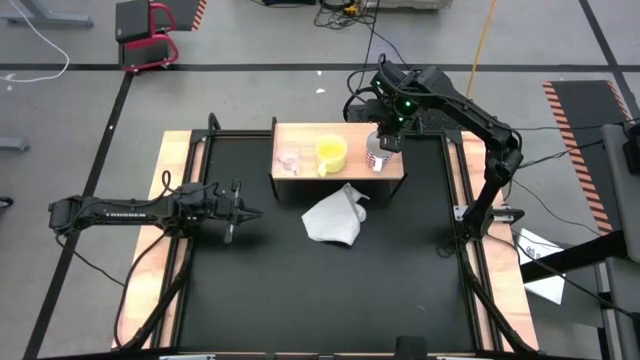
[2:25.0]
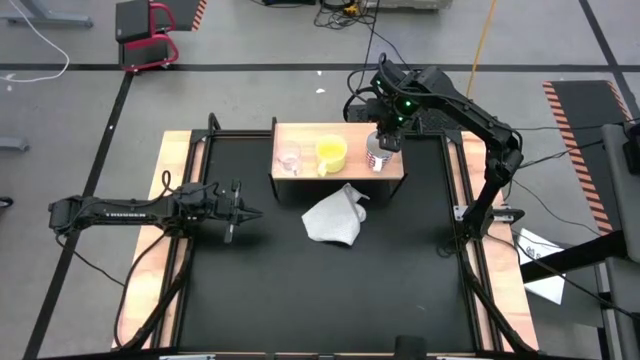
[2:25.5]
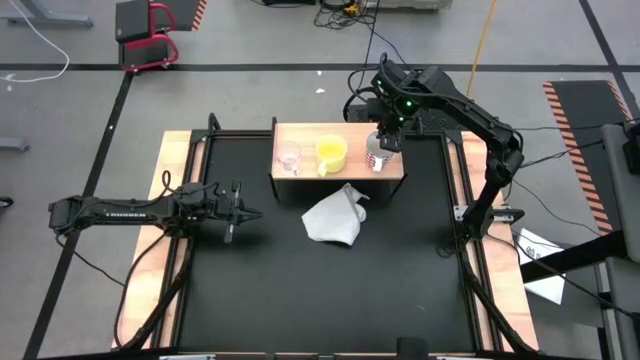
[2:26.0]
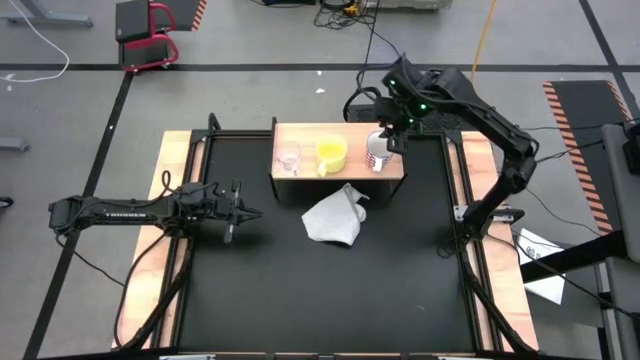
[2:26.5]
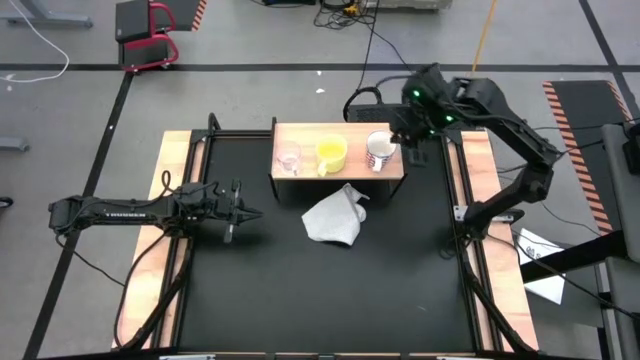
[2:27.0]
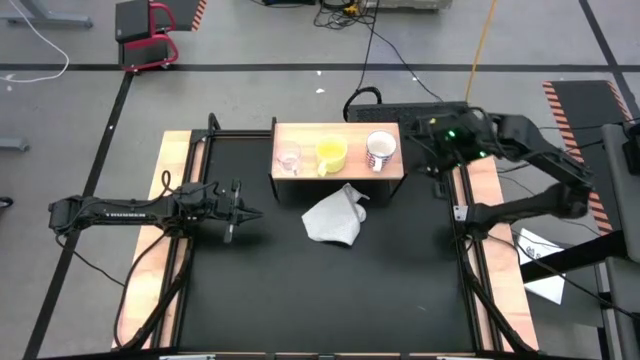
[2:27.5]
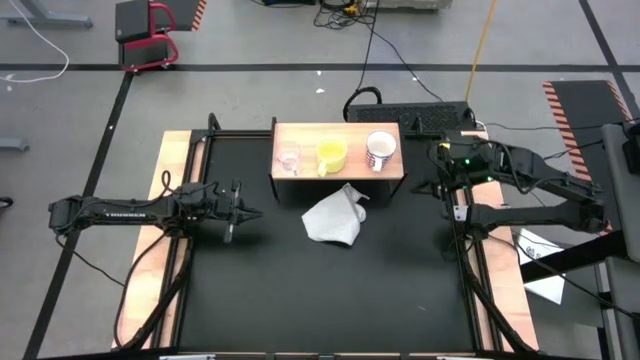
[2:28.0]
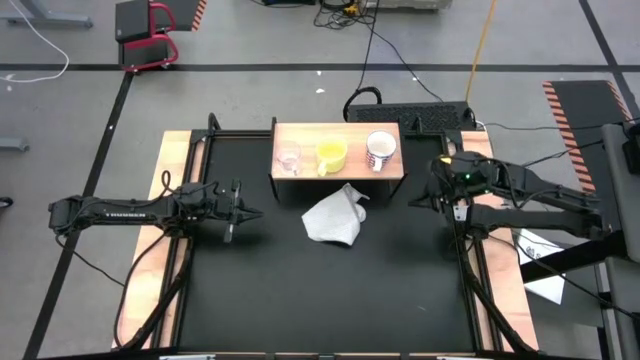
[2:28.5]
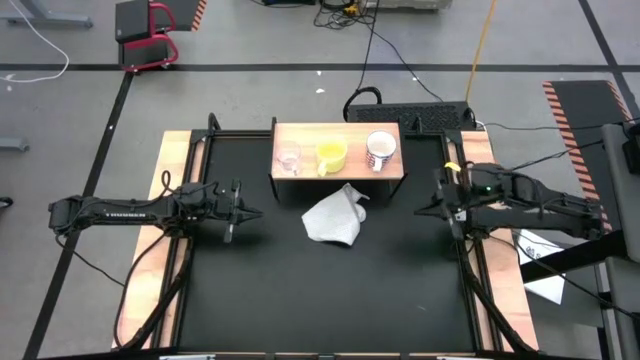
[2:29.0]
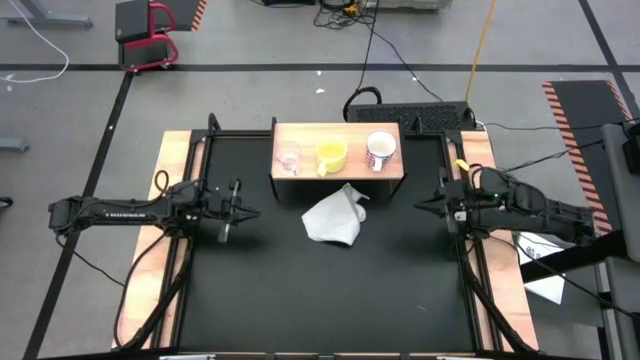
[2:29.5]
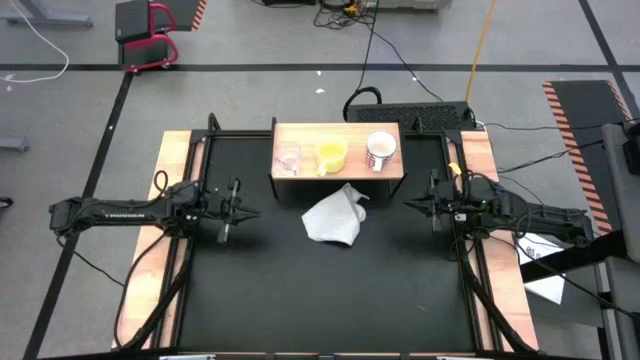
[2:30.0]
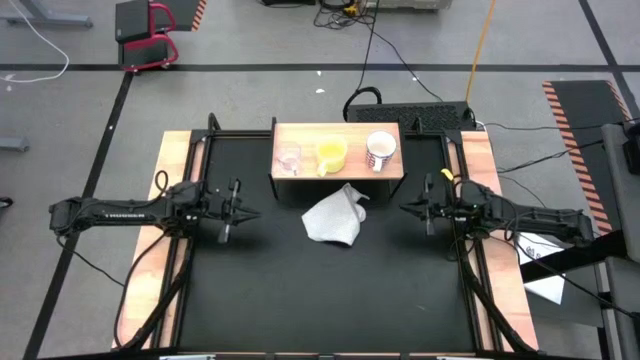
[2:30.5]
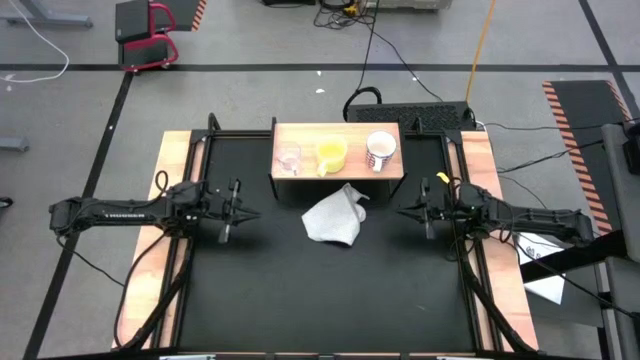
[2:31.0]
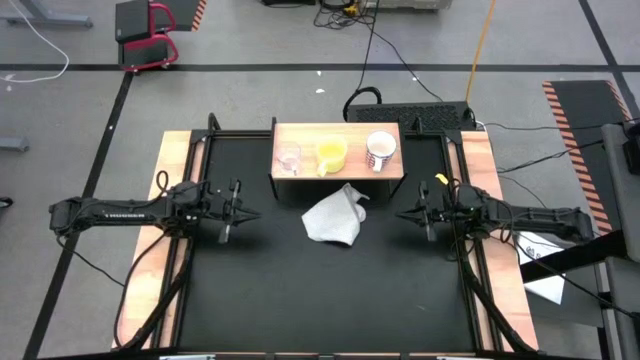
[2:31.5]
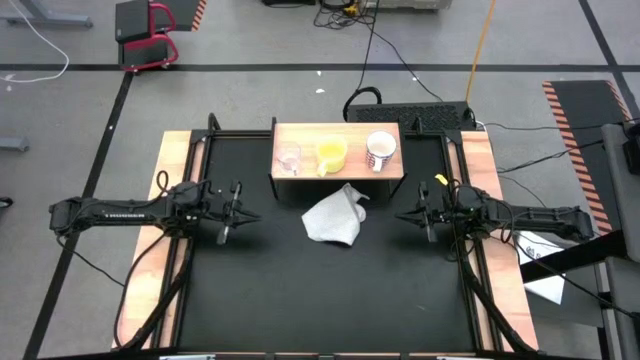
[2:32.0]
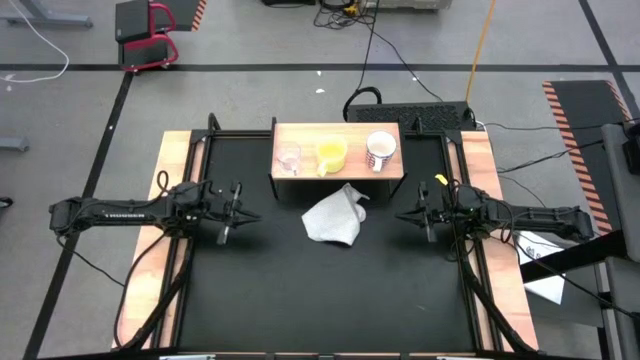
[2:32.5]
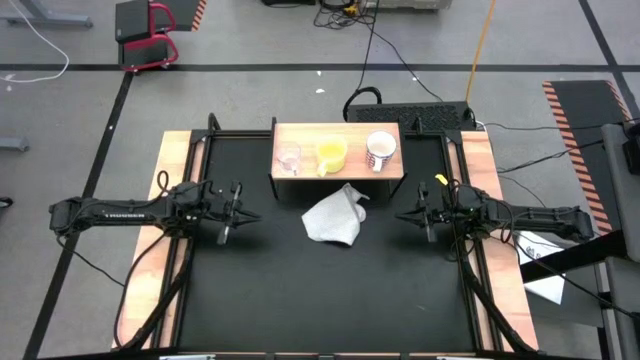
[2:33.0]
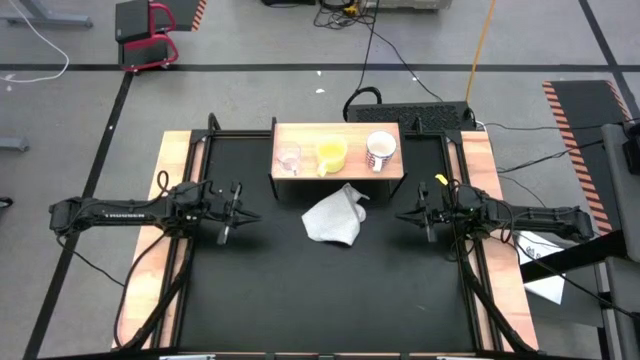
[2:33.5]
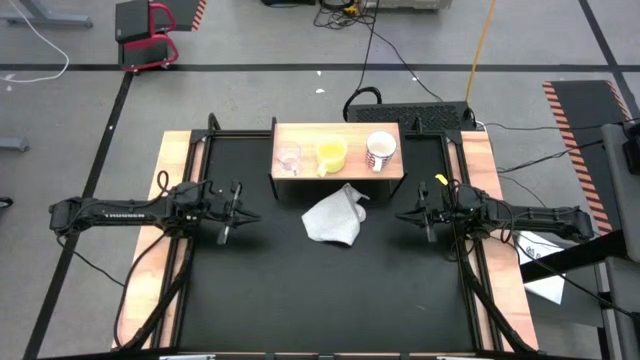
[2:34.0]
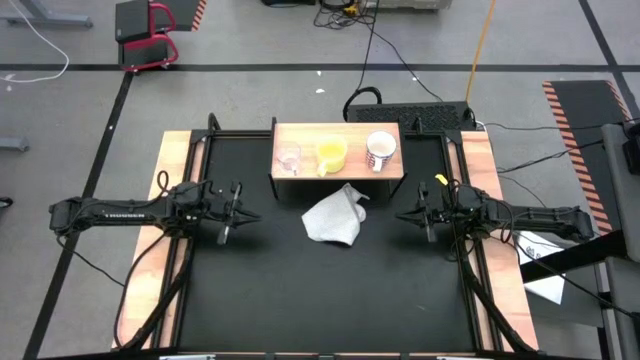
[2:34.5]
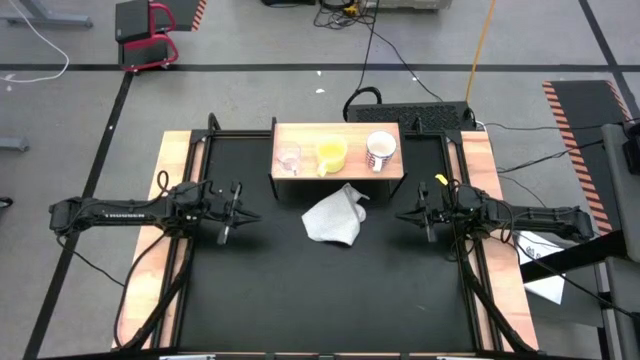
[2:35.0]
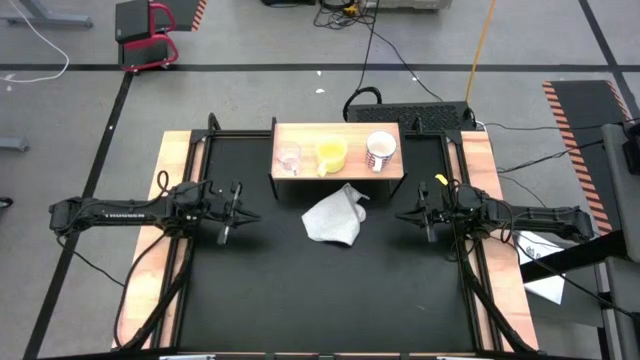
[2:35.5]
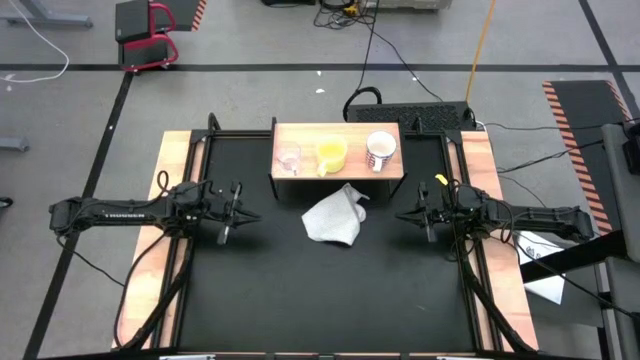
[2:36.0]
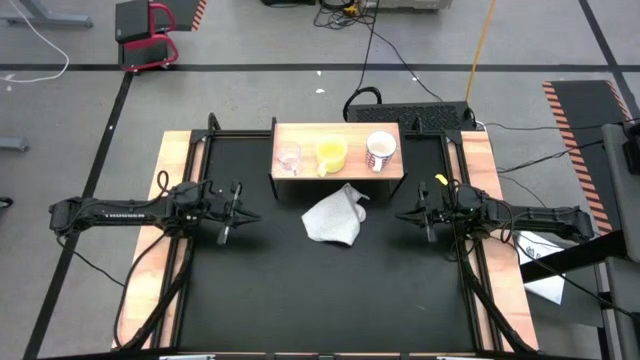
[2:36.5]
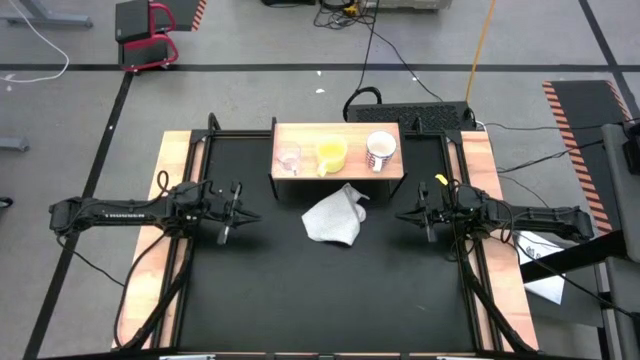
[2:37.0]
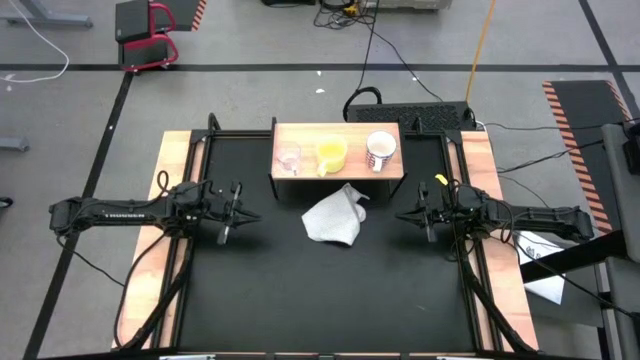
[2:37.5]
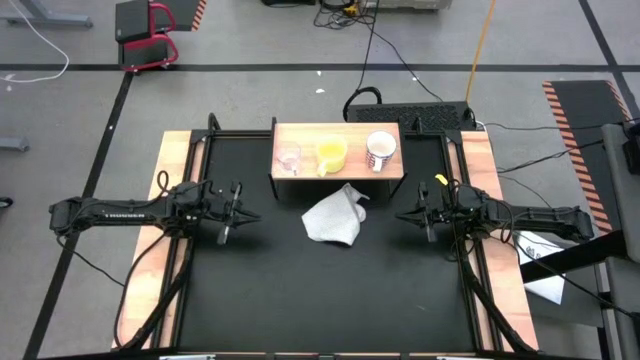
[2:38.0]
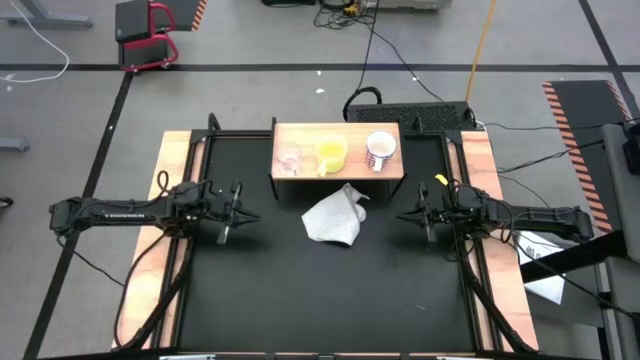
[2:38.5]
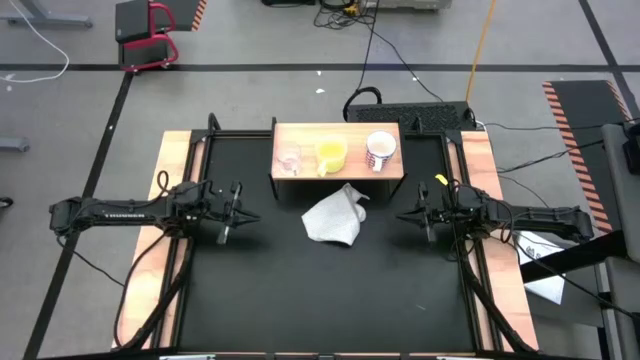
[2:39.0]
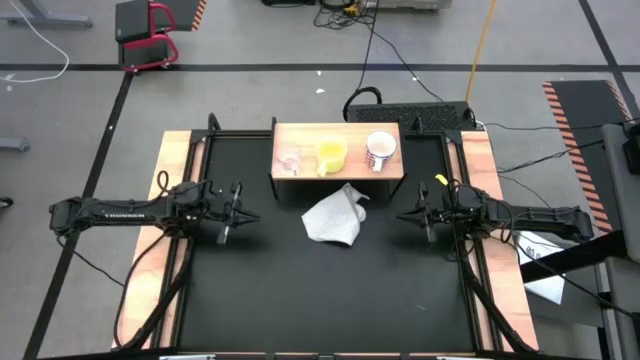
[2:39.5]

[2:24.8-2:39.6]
Task: Stack small to large cups/mugs on shelf
Return to Home Position

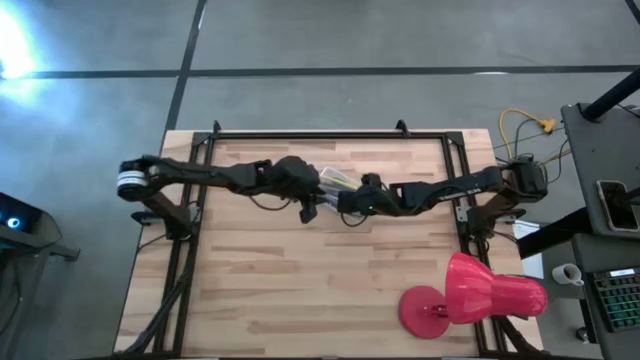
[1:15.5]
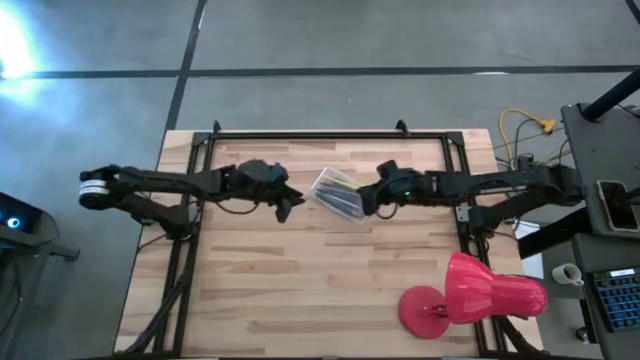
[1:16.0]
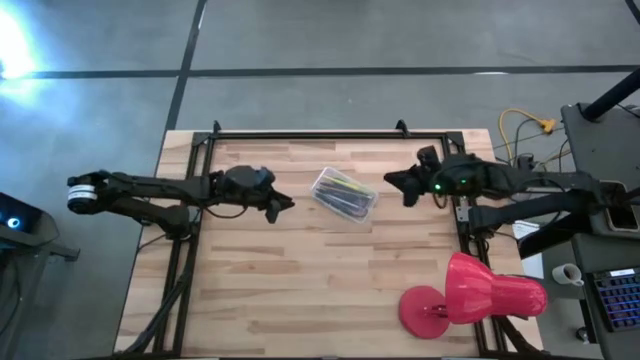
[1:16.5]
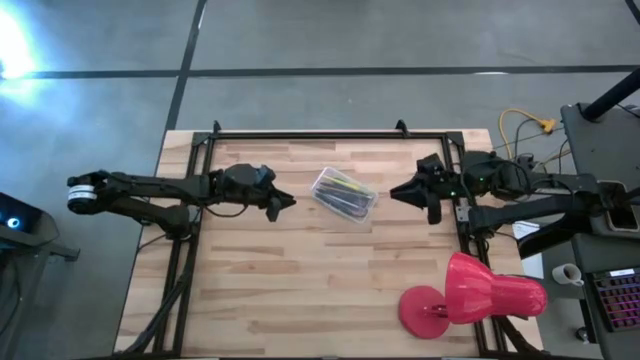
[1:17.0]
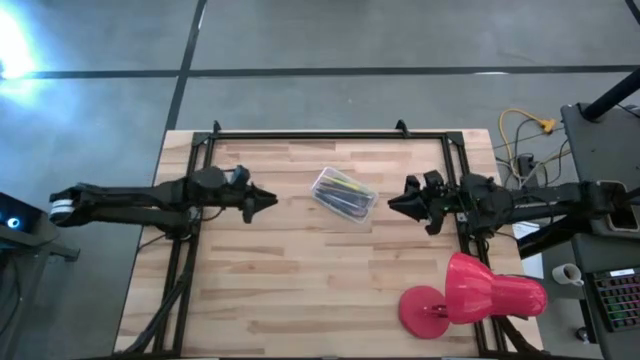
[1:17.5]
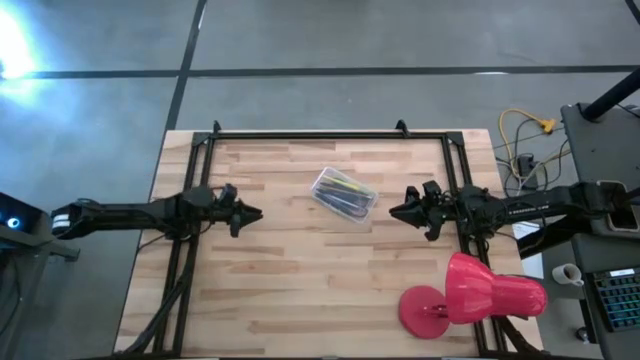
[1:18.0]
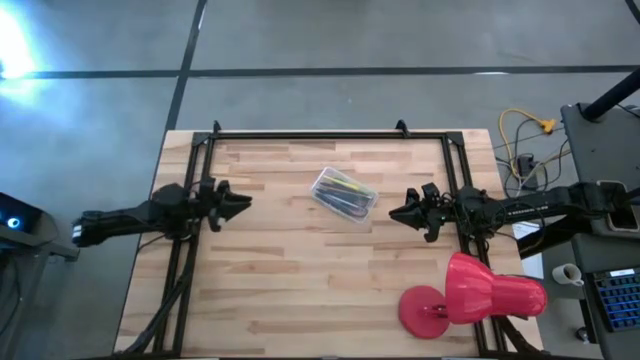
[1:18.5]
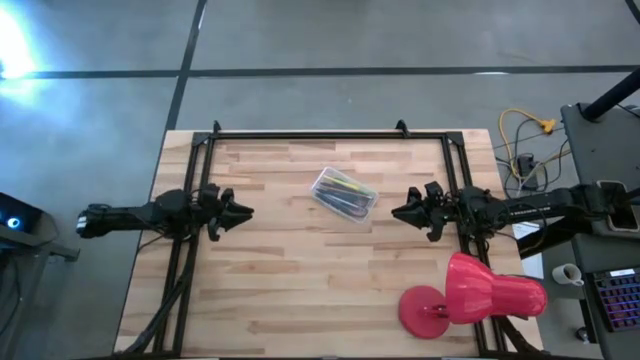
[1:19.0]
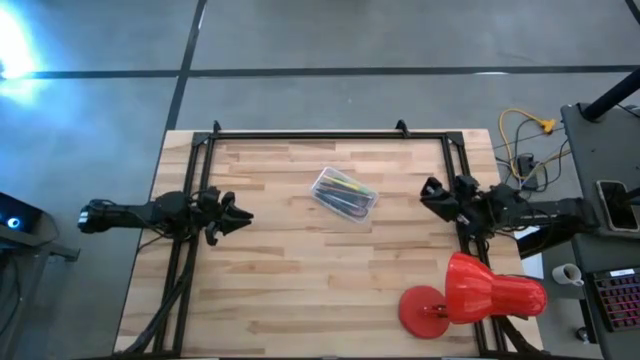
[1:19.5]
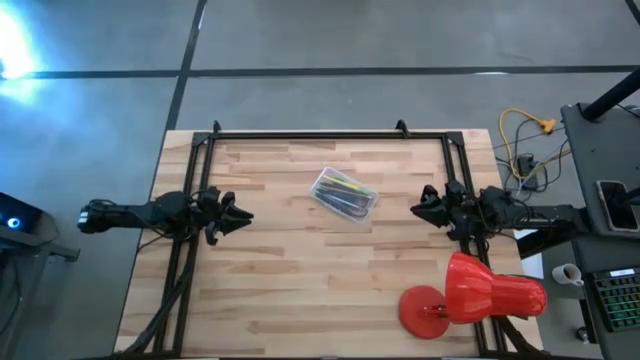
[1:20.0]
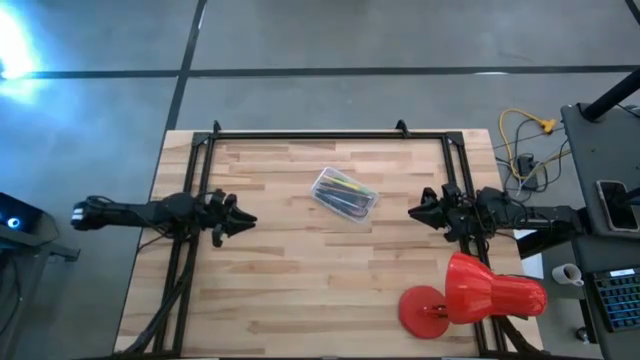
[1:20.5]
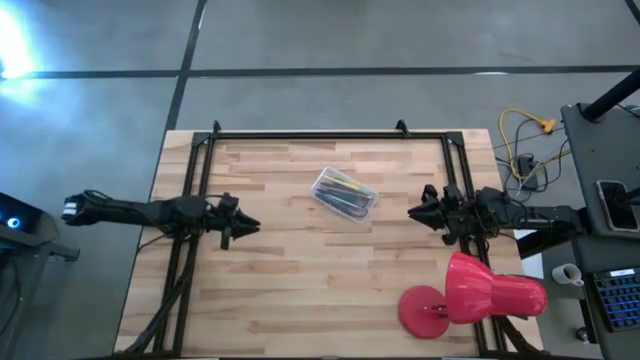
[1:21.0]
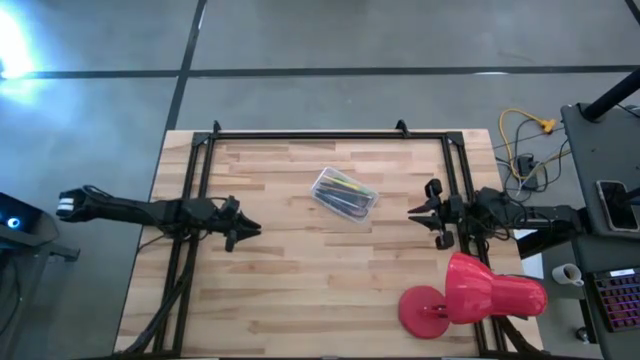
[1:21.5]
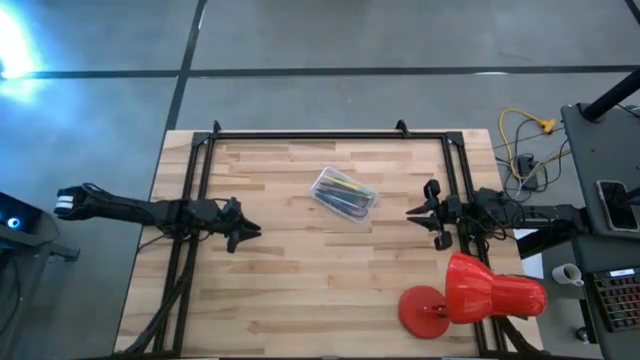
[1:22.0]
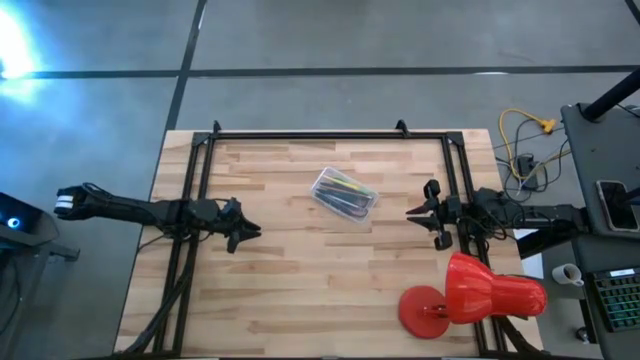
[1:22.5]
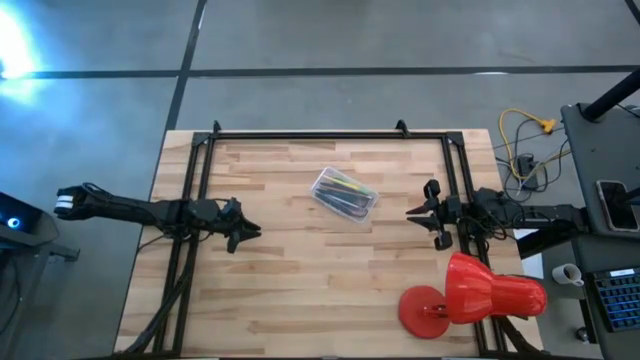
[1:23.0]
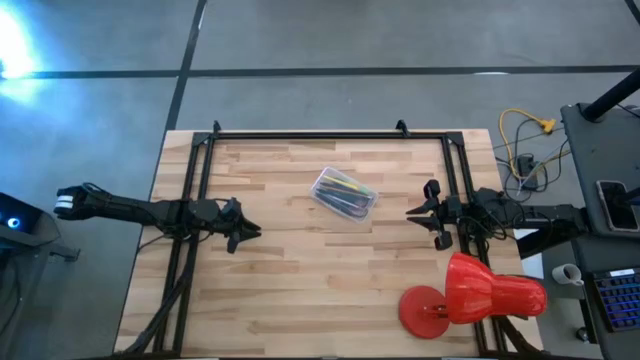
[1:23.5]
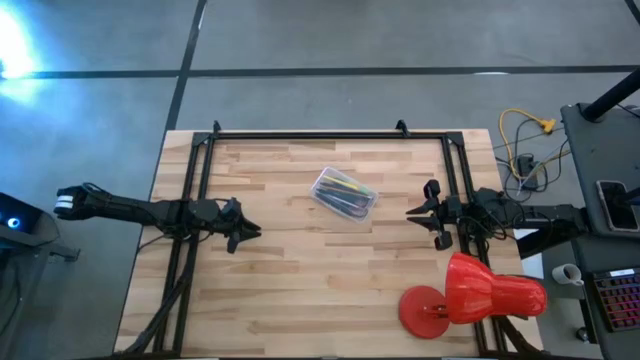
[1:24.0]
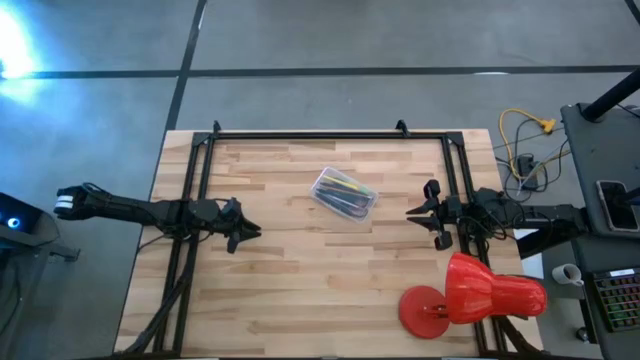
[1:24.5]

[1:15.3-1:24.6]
Task: Pick & place school supplies into a supply box
Return to Home Position
